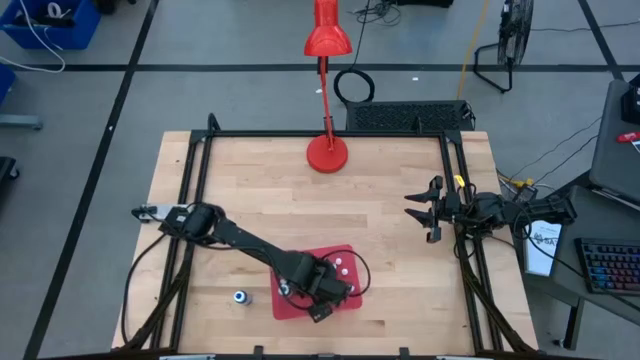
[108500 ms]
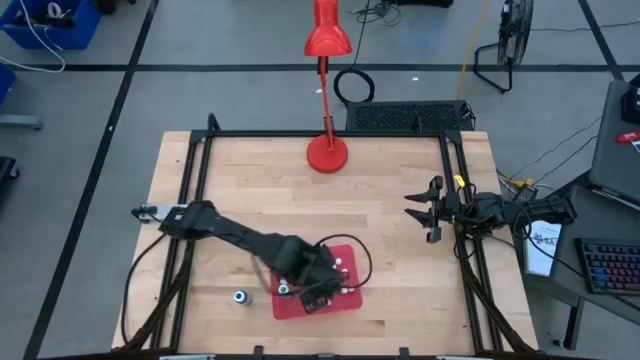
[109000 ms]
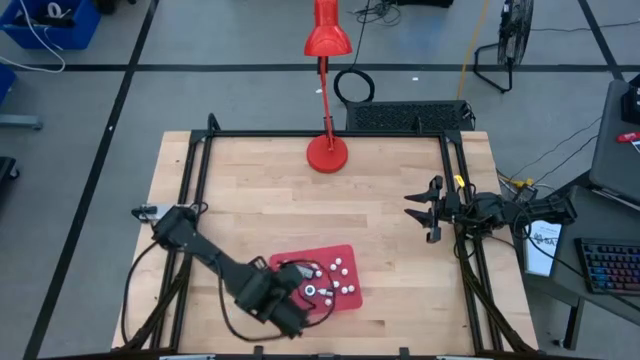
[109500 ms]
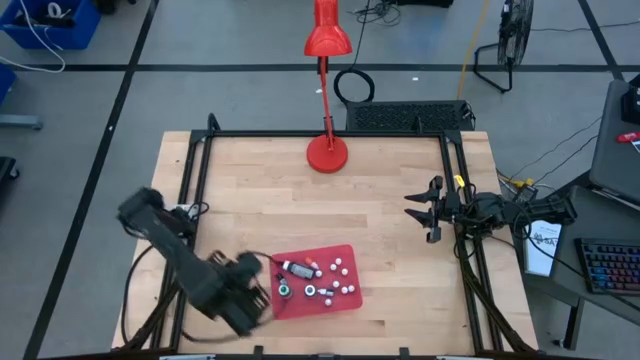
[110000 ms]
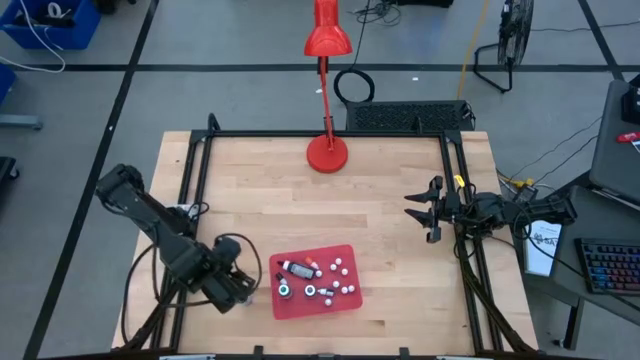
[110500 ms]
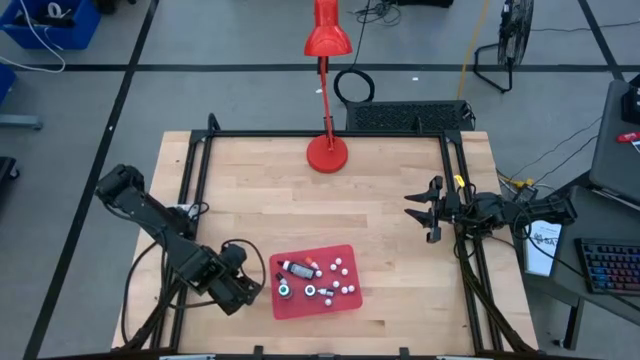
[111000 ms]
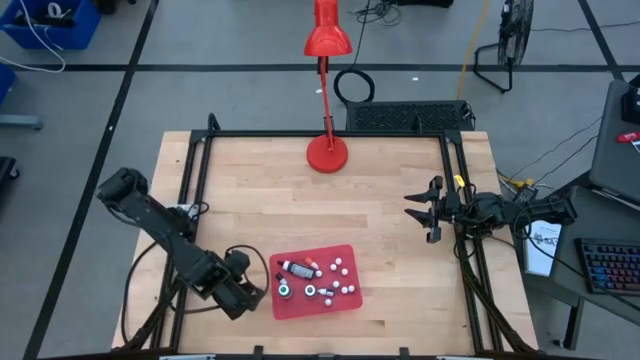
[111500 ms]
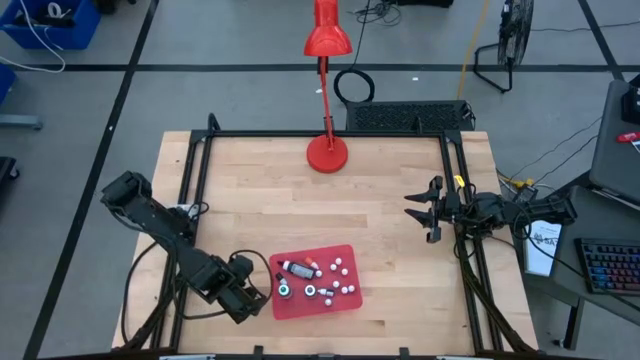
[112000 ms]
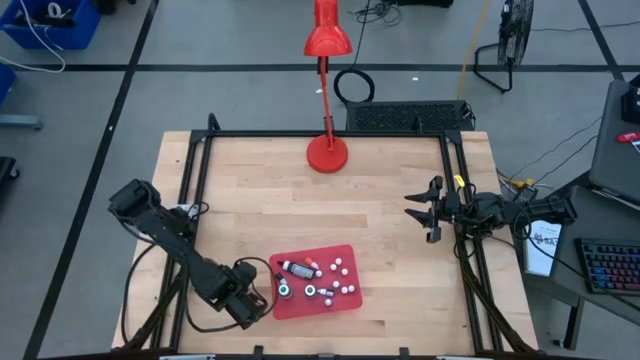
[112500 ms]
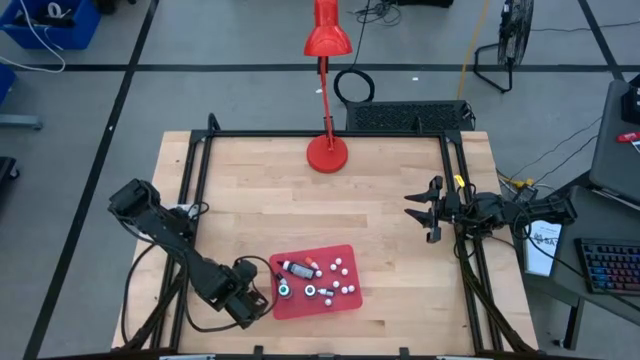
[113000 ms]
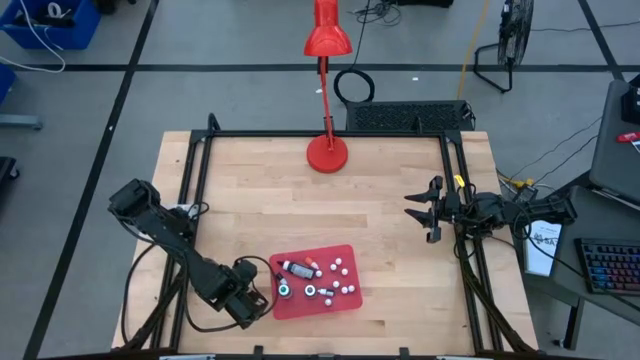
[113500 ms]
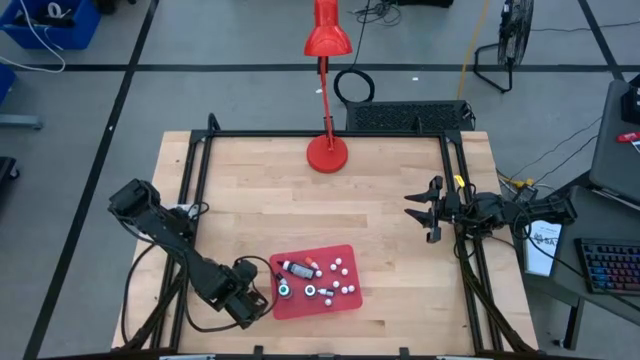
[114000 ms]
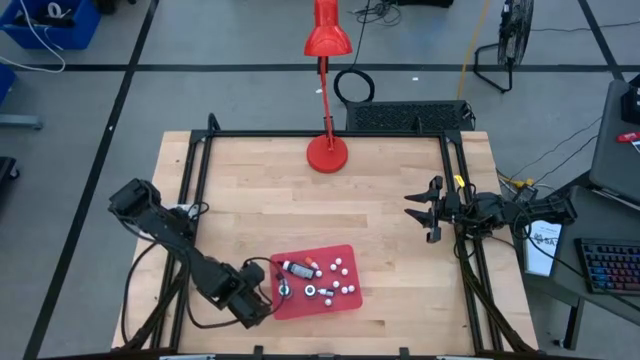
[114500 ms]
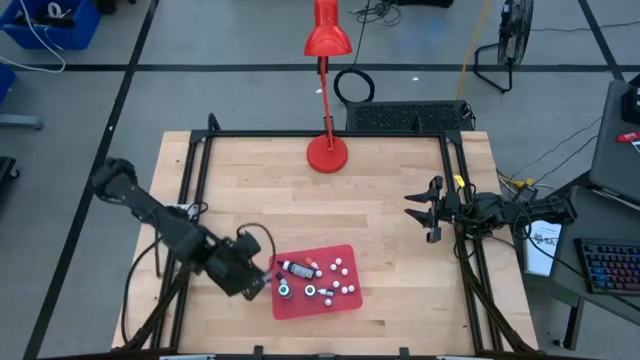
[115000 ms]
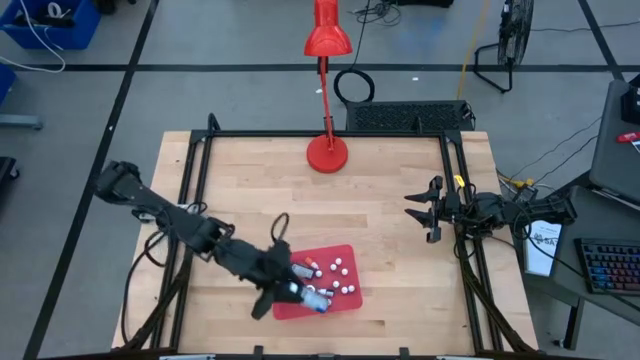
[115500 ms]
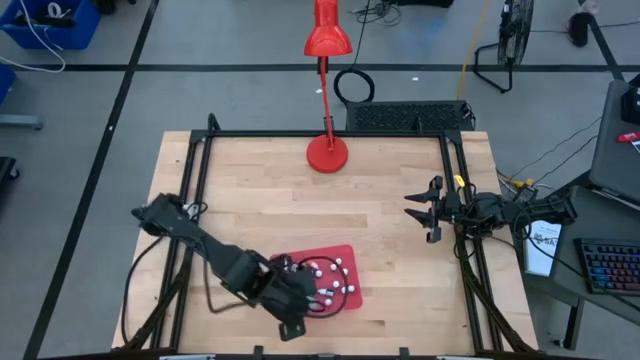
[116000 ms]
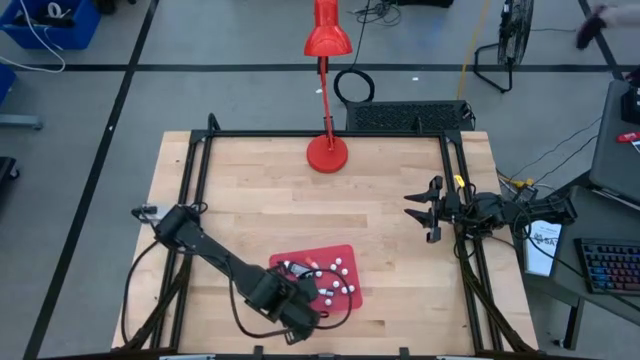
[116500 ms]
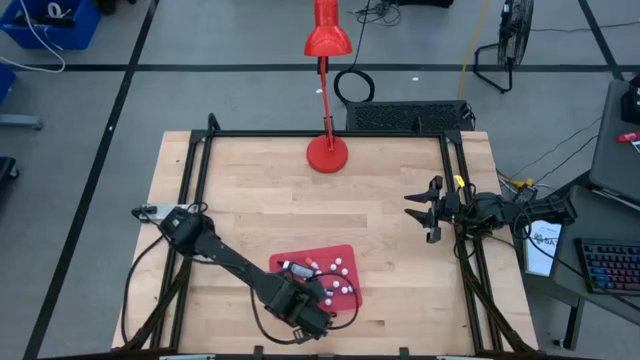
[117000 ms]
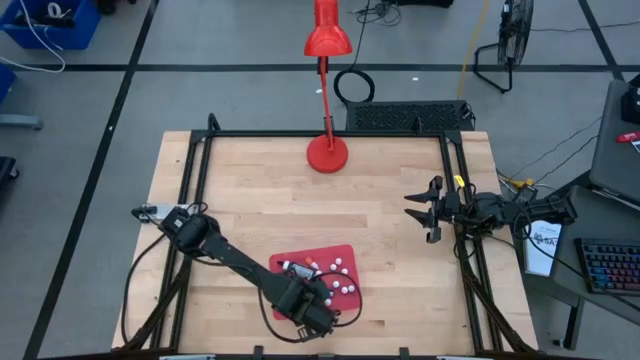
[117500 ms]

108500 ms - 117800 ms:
Task: Pick & Place food coloring
Put the big blue food coloring bottle into the pink container

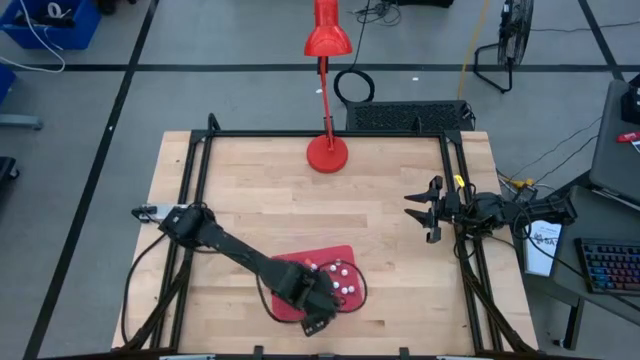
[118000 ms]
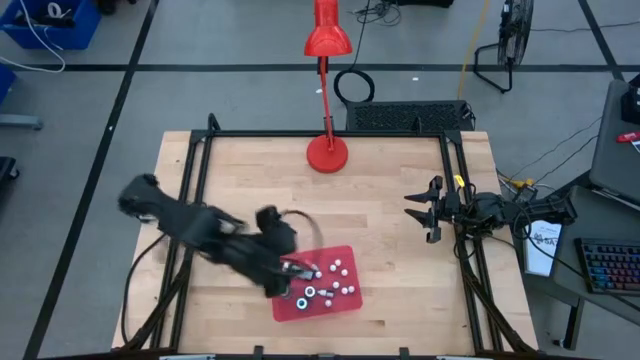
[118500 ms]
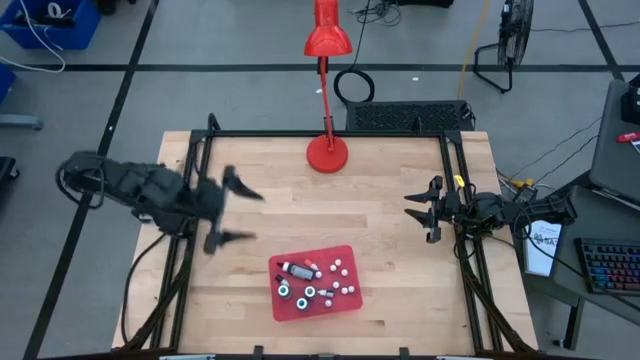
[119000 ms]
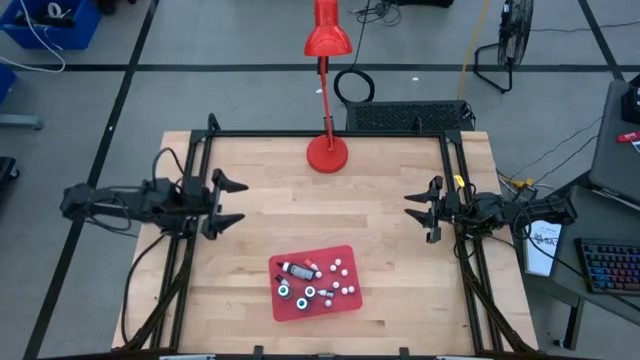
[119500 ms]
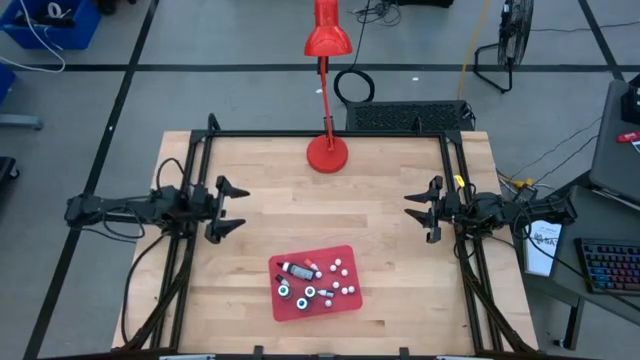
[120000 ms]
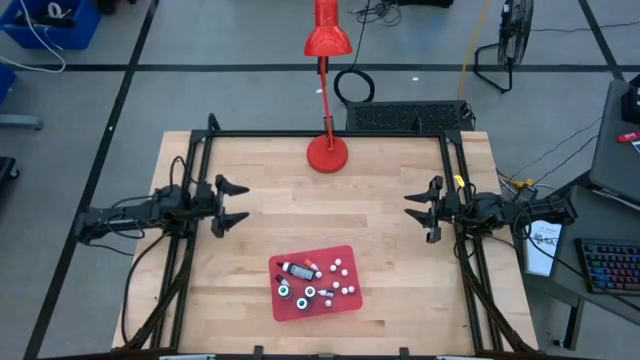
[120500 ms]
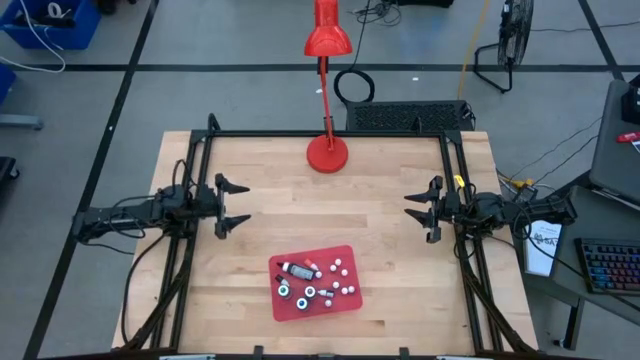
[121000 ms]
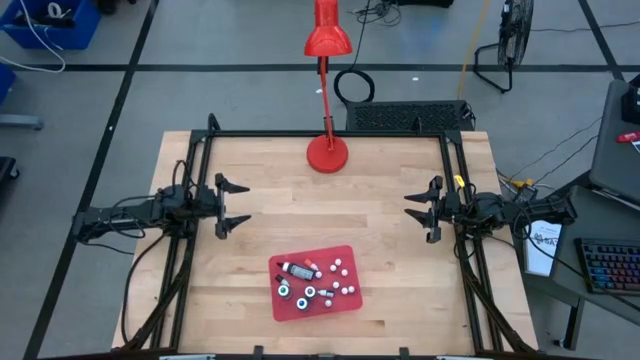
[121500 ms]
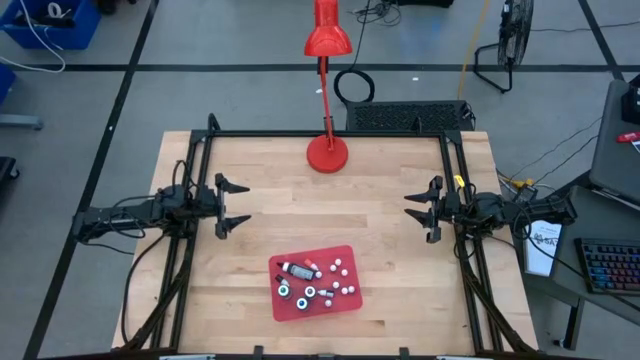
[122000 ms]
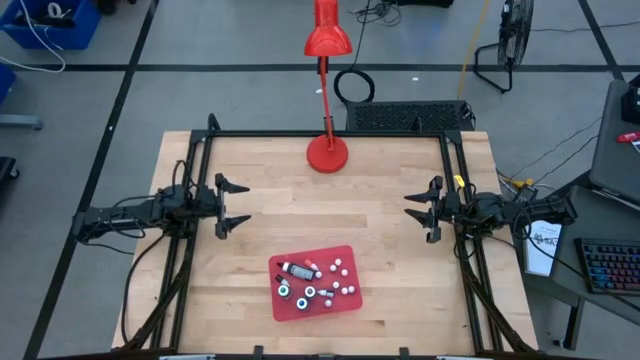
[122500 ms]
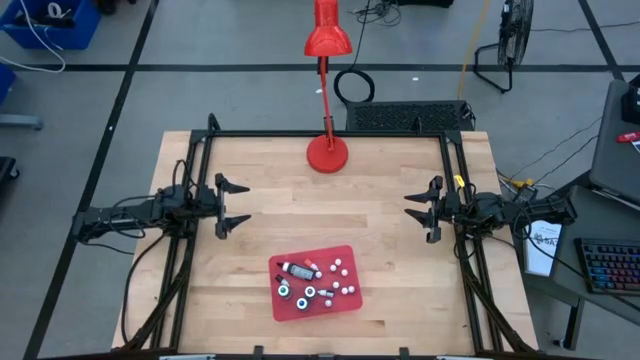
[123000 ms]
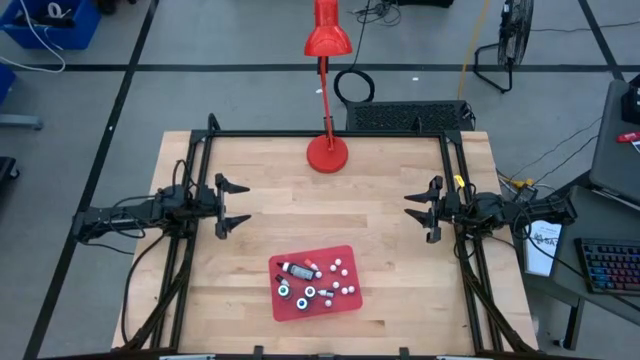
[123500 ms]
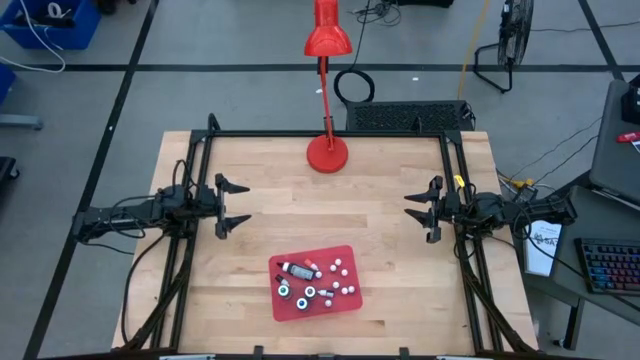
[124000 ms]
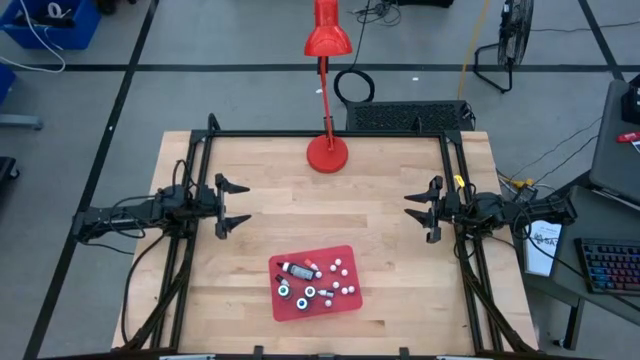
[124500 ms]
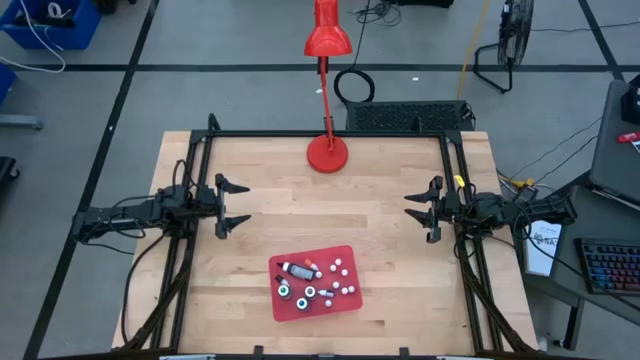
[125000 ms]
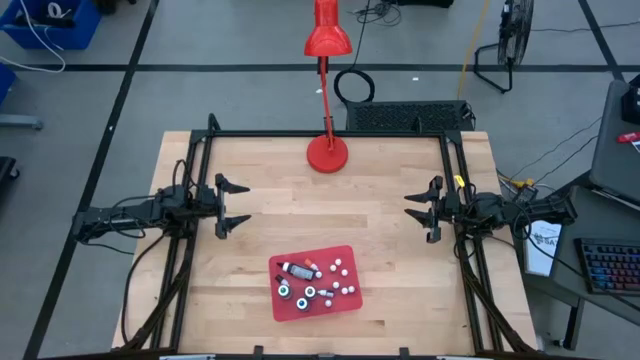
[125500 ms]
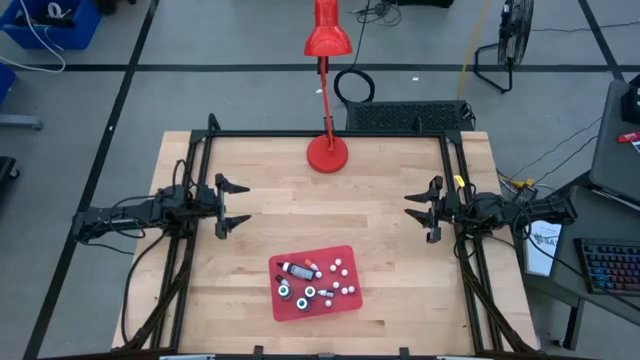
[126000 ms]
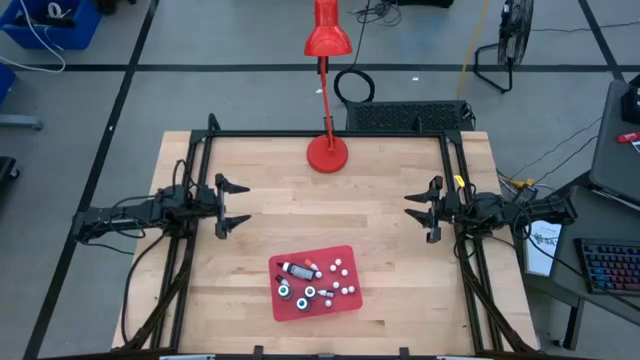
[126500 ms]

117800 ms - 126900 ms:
Return to Home Position

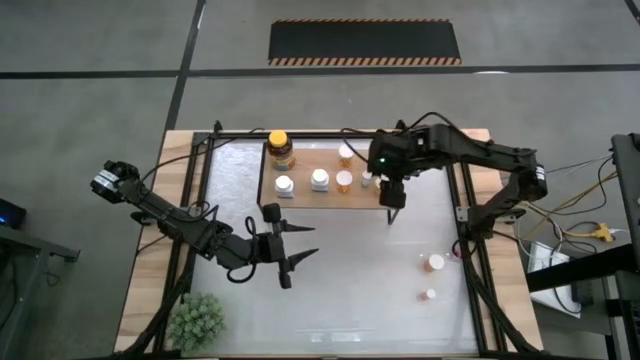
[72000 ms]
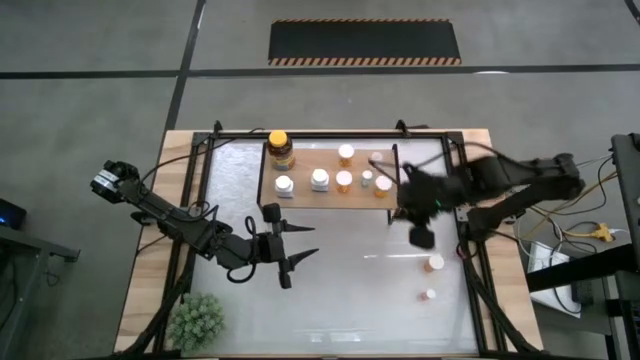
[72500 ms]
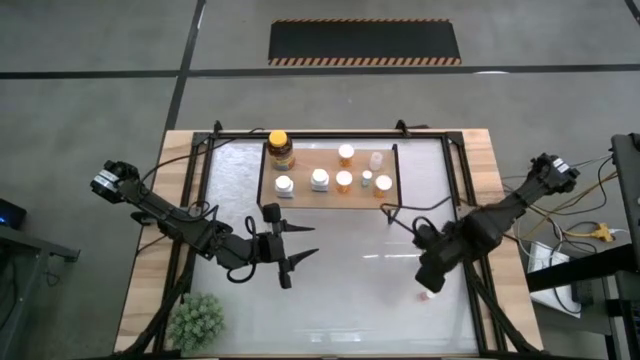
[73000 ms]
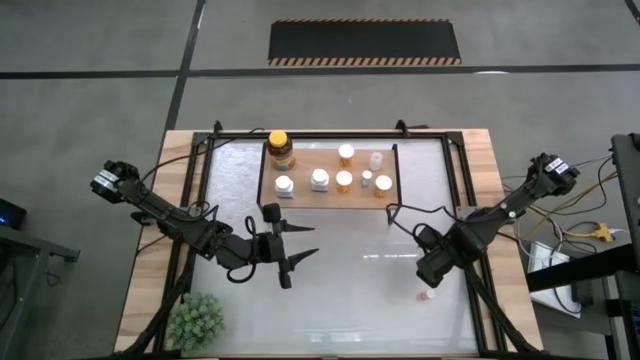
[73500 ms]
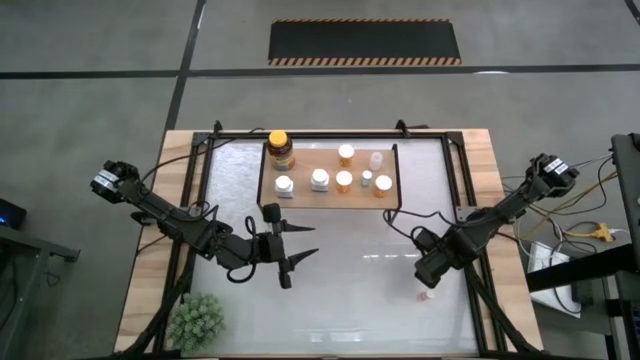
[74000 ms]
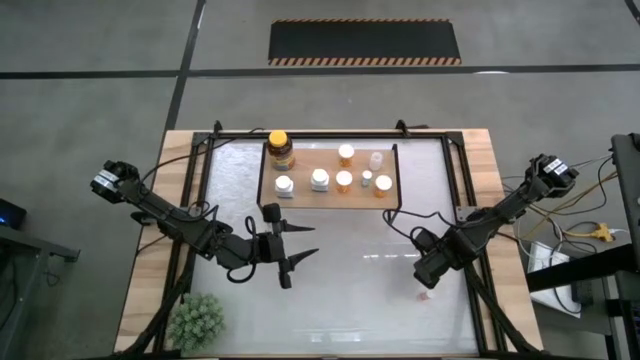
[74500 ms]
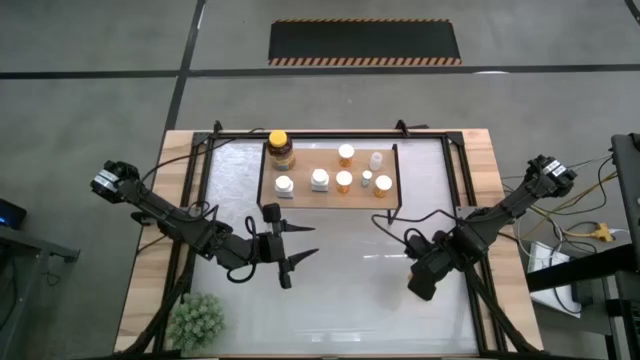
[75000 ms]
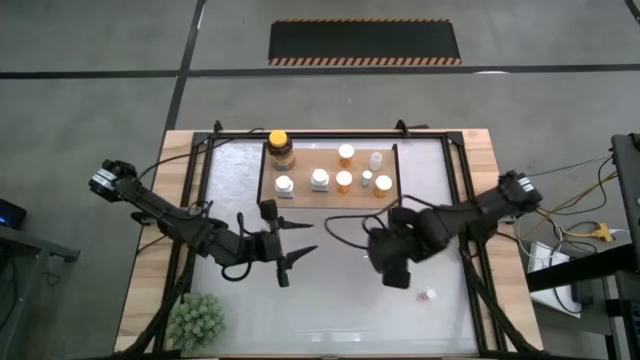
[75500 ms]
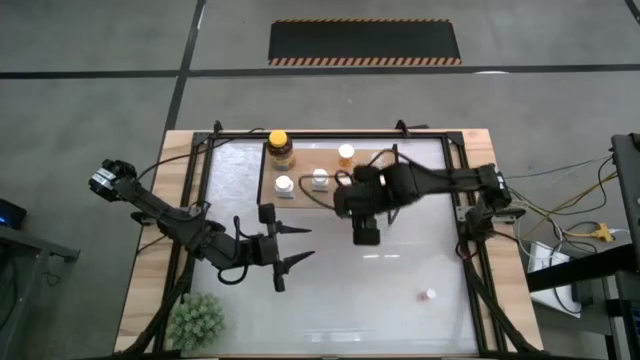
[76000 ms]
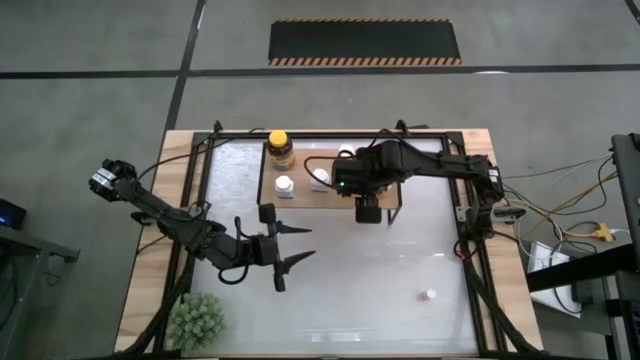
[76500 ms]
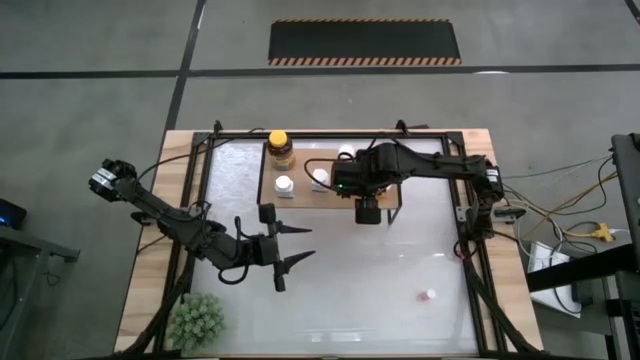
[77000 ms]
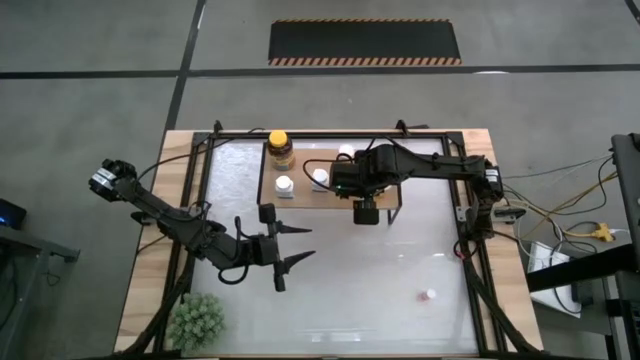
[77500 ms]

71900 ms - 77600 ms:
Task: Pick and place medicine bottles onto shelf by color
Put the orange pill bottle on the shelf
